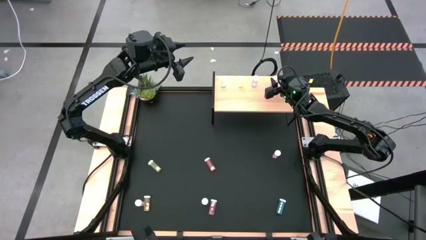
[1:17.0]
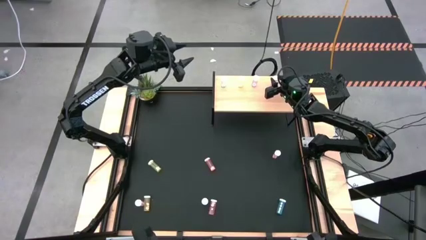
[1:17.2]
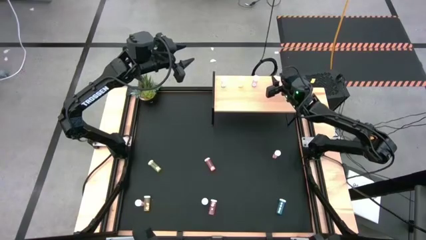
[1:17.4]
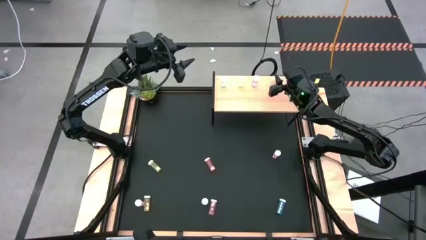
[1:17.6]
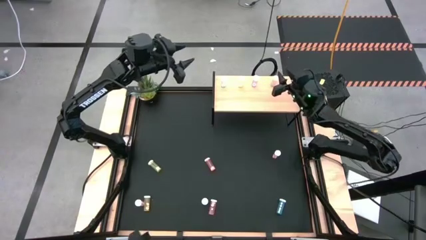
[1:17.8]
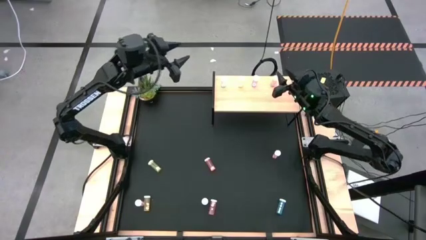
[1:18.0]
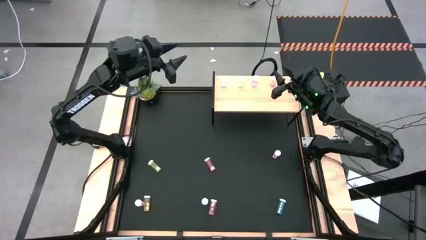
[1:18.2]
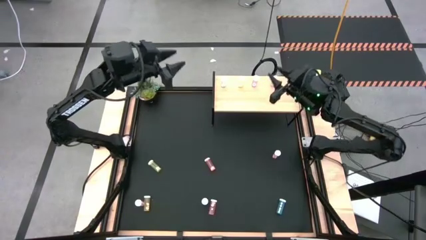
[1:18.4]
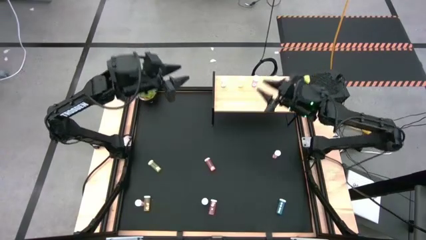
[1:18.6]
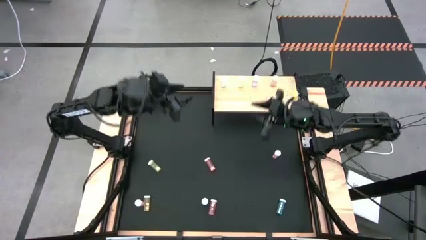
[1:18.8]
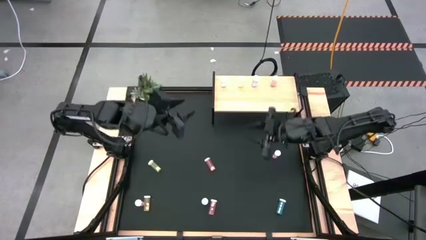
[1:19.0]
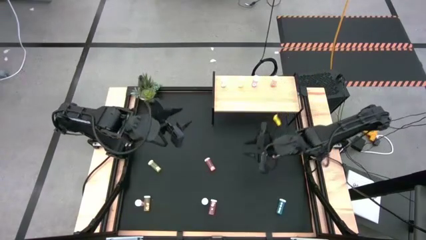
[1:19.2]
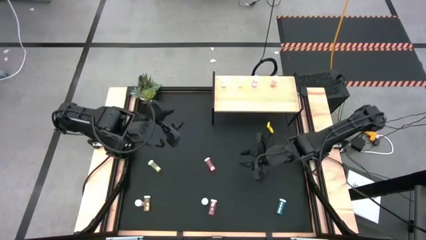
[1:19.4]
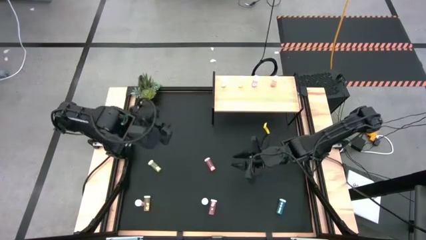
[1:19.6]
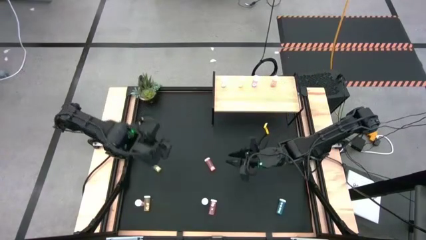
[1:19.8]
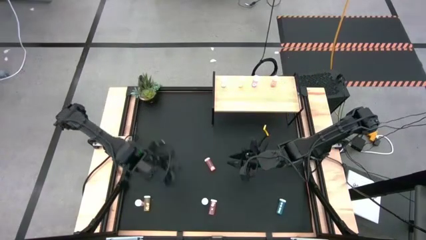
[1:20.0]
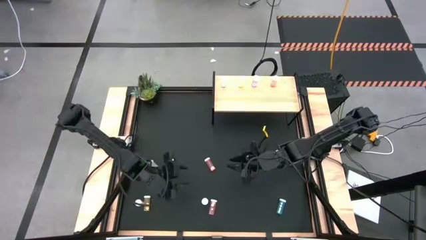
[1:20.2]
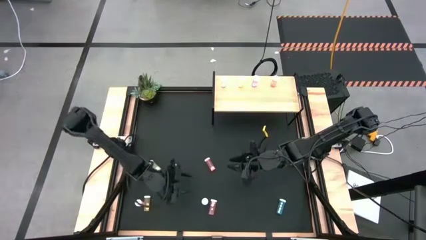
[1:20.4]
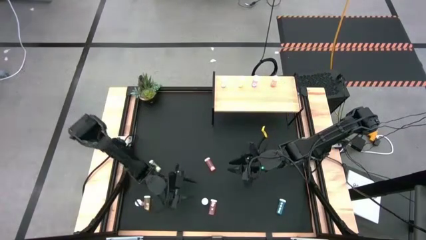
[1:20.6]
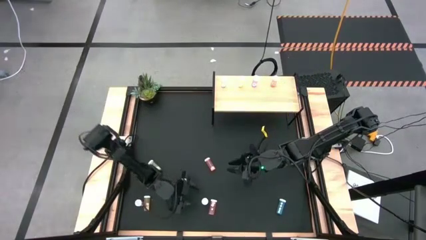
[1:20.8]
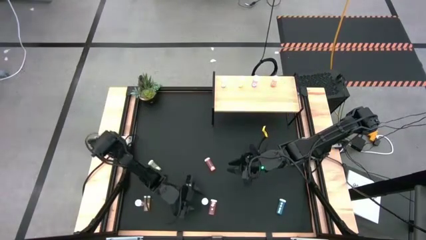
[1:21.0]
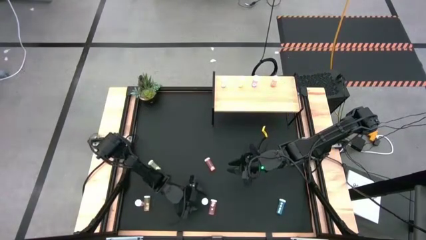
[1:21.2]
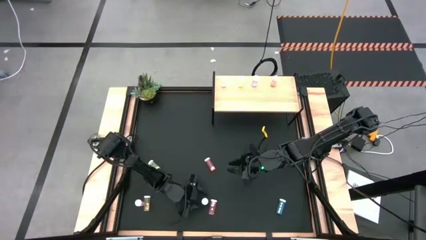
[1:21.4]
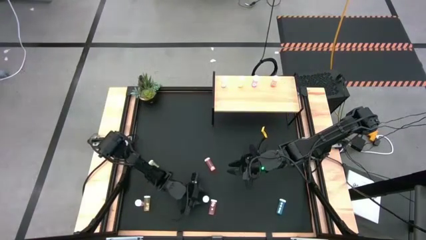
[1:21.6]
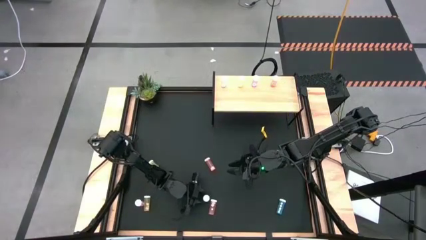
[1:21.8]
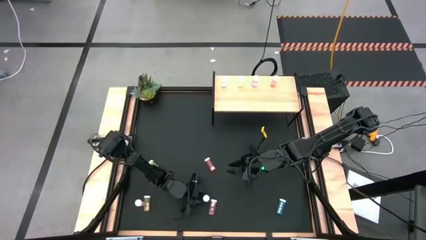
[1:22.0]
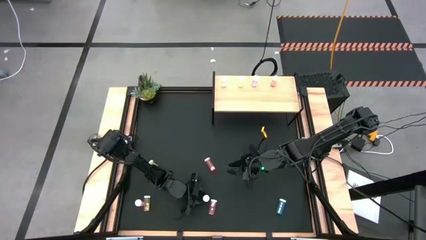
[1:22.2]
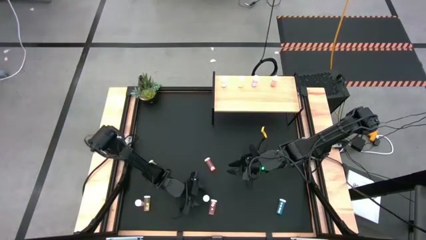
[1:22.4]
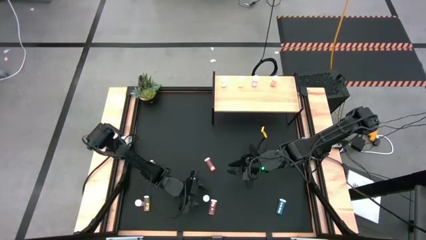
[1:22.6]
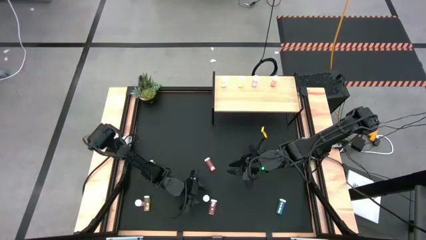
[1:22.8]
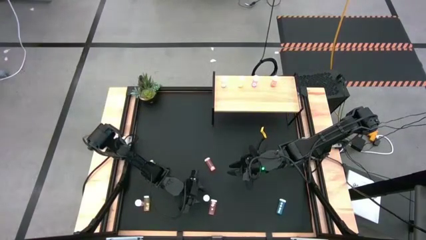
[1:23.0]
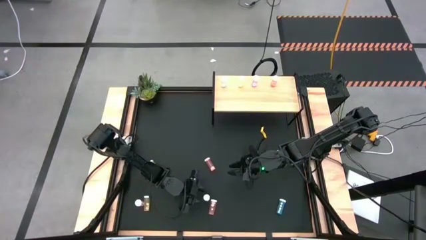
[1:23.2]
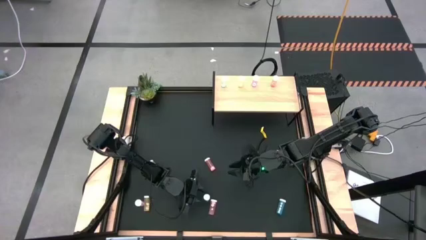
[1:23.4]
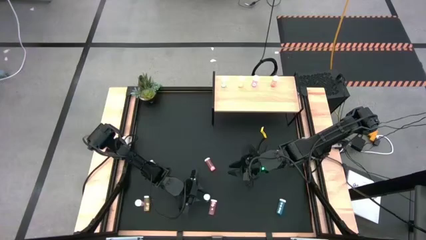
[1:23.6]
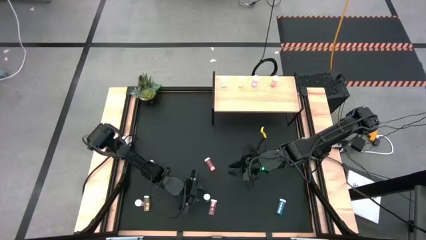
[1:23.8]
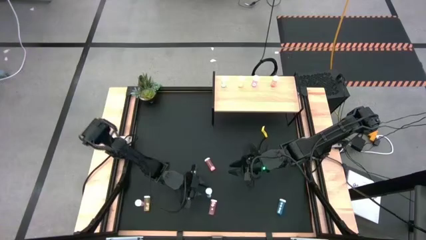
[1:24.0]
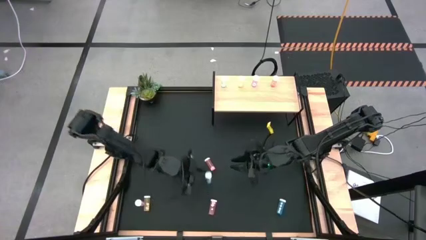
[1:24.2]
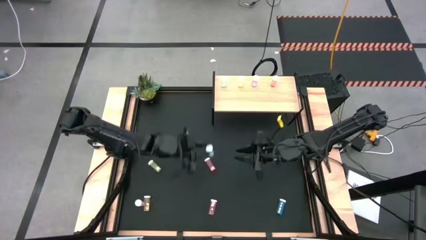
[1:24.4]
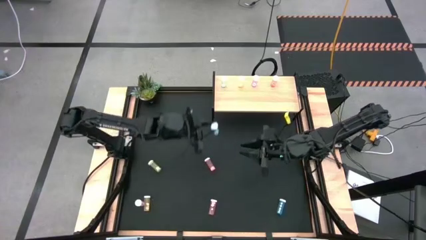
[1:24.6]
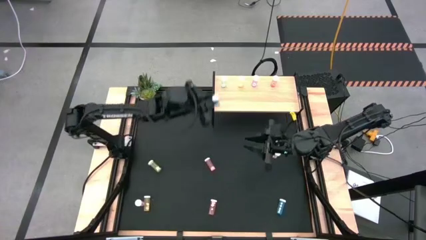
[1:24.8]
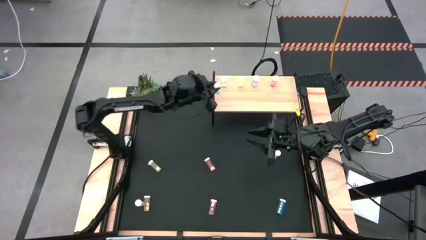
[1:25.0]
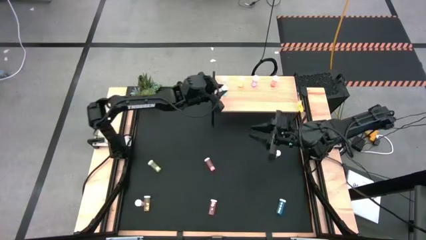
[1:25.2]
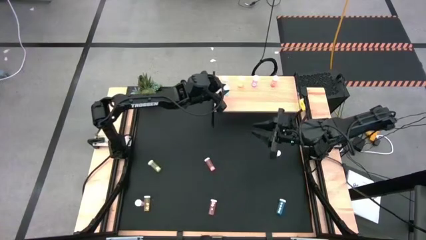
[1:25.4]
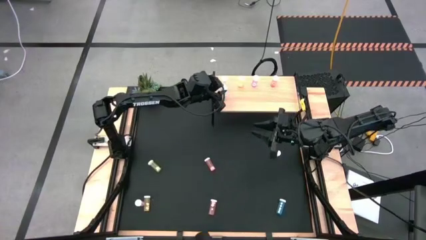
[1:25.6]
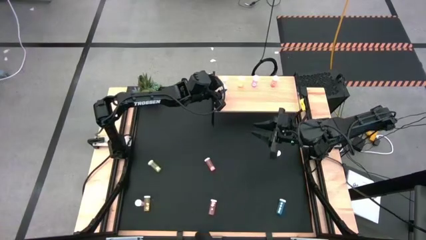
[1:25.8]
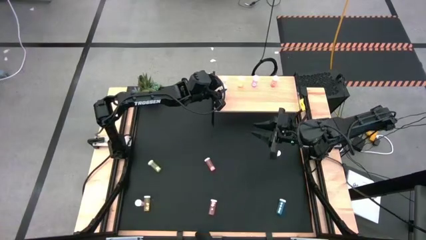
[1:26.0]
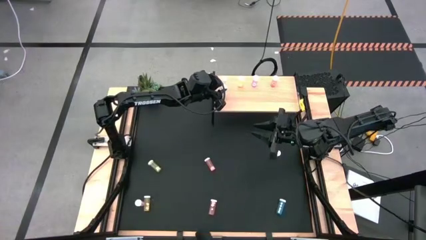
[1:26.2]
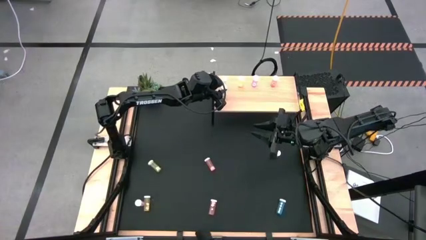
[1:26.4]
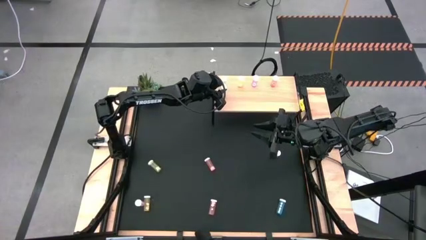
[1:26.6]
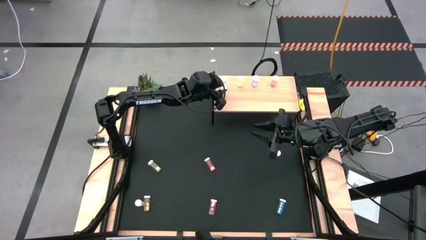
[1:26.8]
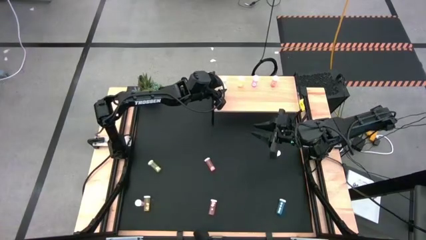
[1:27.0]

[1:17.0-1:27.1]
Task: Pick and place medicine bottles onto shelf by color
Put the left blue pill bottle on the shelf aligned with the other blue pill bottle
